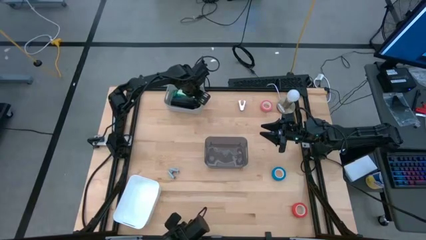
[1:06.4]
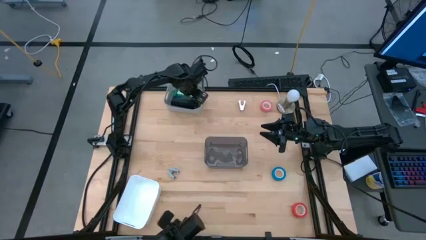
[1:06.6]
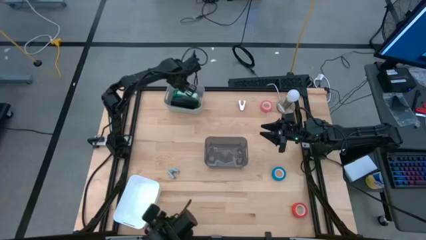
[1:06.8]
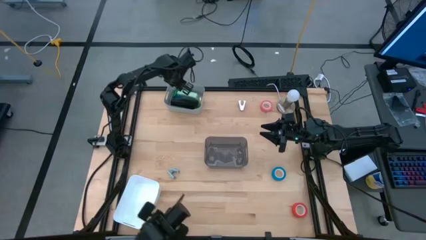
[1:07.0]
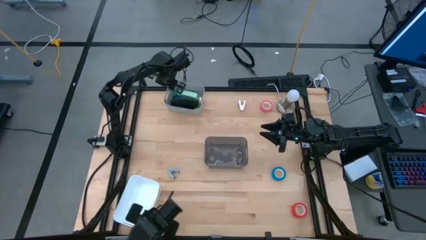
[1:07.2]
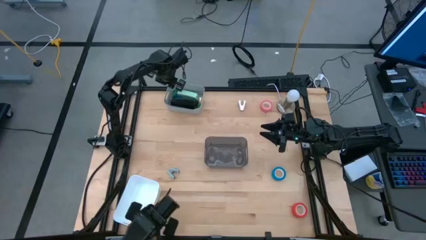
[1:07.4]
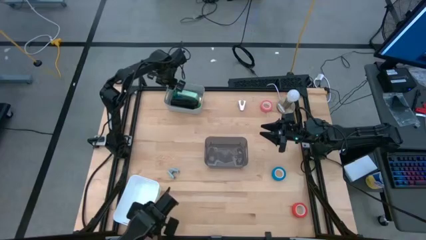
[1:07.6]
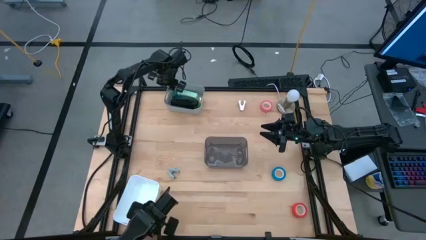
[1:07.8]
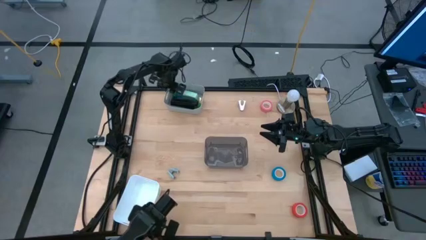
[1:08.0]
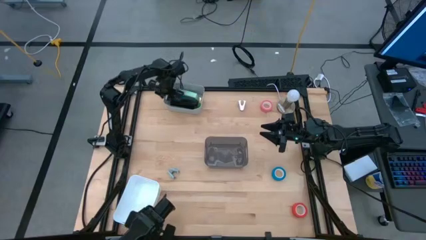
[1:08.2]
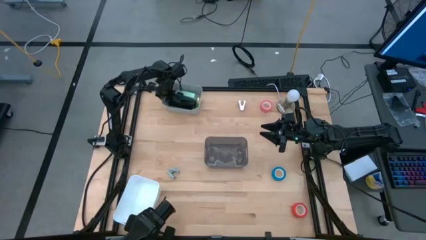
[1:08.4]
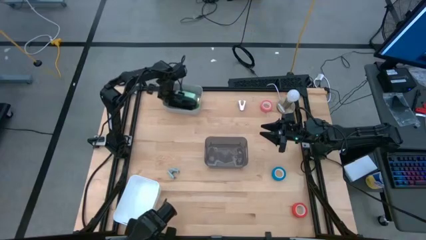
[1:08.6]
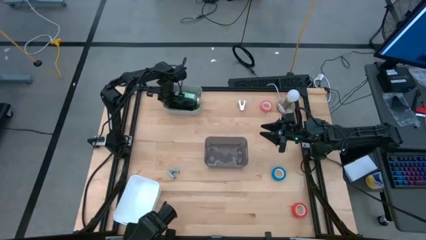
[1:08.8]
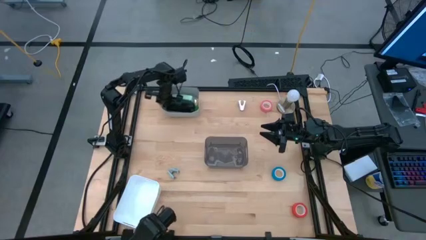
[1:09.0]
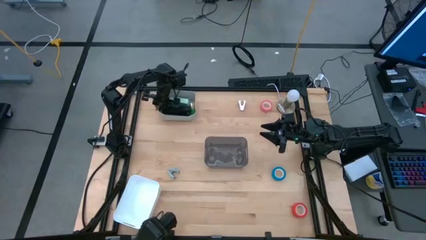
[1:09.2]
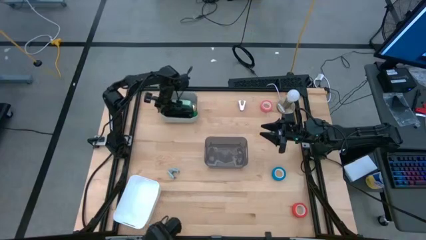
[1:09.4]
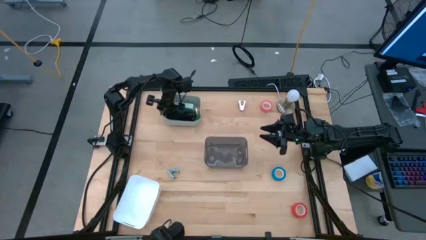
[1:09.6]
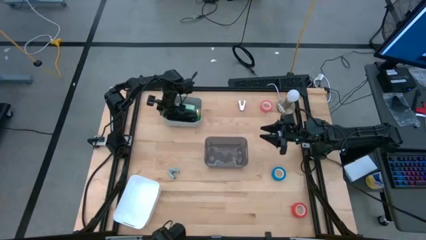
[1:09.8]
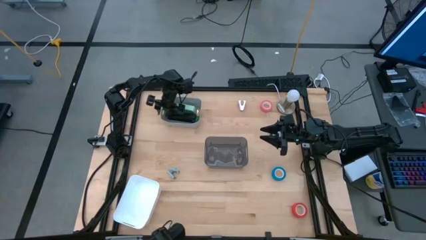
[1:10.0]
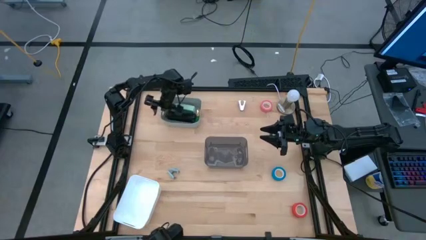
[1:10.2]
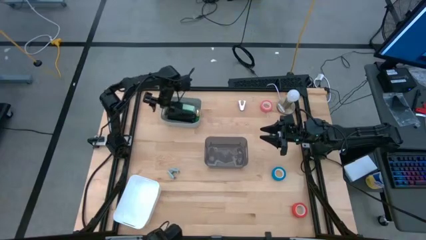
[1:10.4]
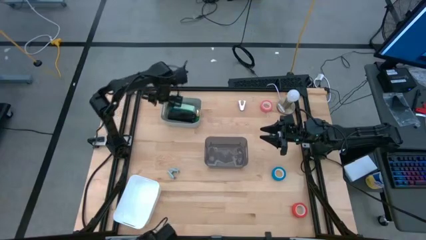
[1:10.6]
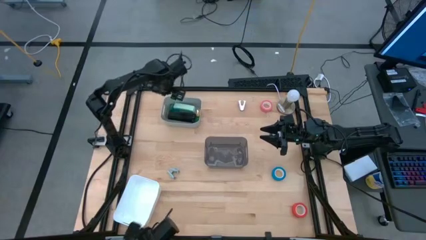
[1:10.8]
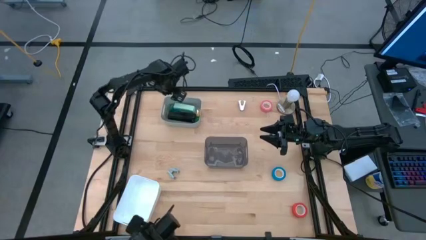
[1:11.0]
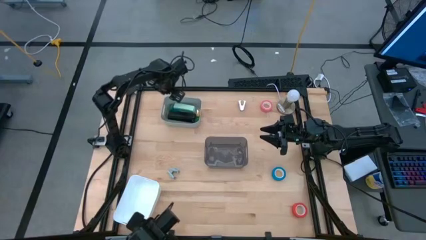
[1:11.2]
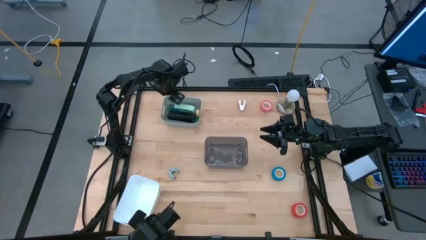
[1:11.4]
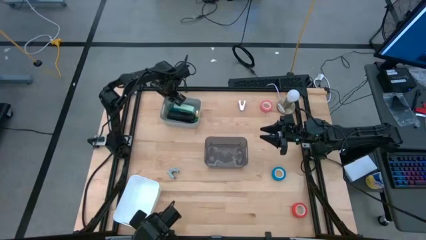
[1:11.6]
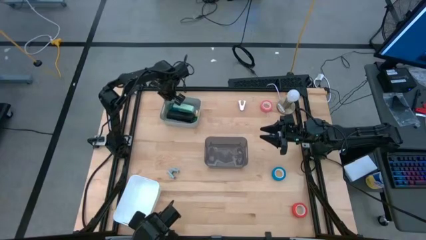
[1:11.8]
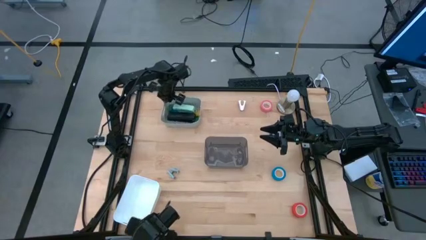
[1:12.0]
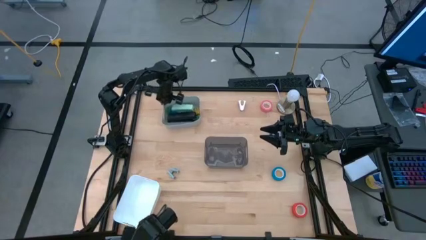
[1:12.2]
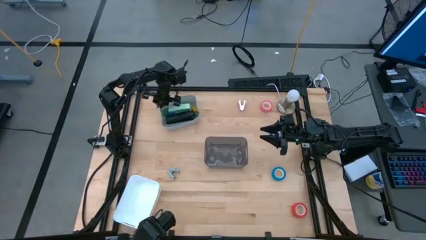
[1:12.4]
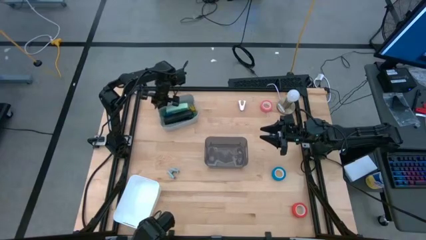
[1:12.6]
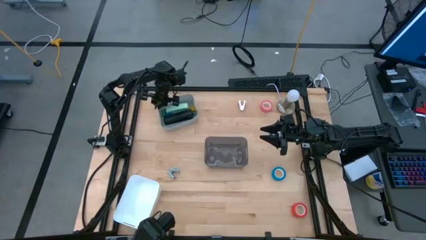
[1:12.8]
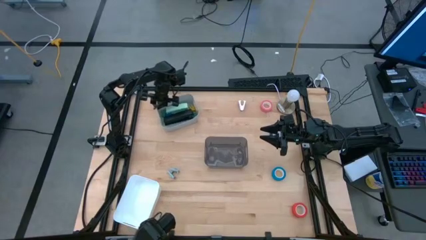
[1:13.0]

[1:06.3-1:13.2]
Task: Pick and place Stapler, Stapler remover, tape
Adjust the gray bin

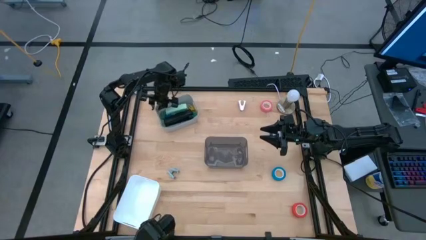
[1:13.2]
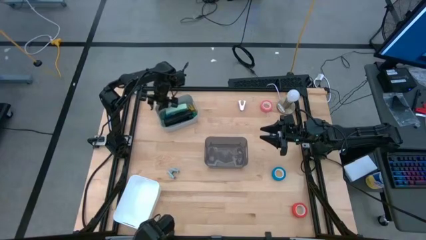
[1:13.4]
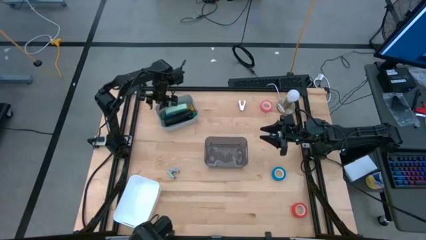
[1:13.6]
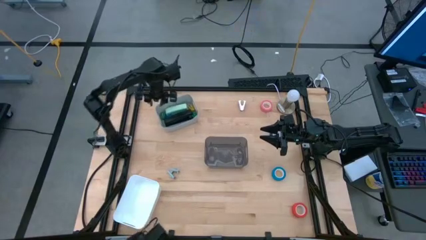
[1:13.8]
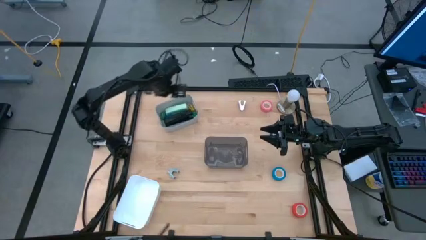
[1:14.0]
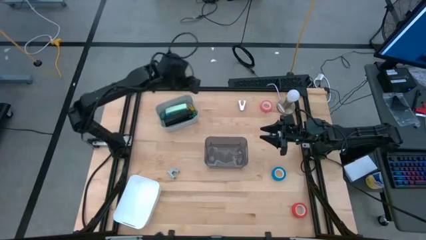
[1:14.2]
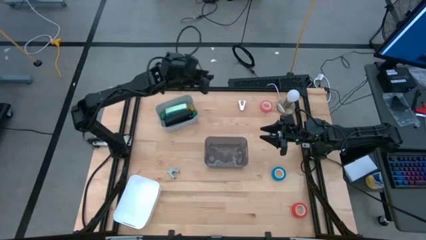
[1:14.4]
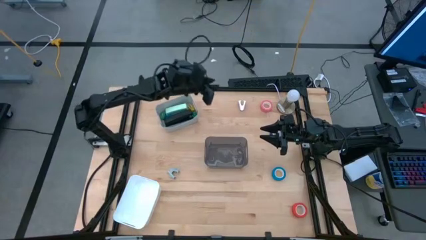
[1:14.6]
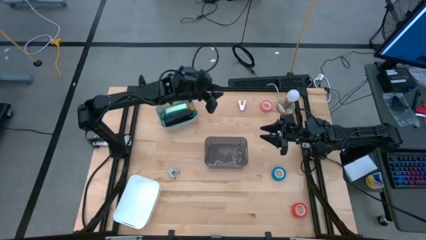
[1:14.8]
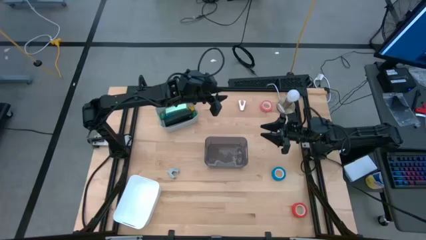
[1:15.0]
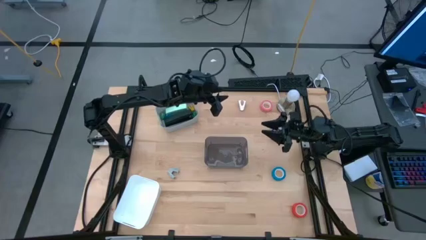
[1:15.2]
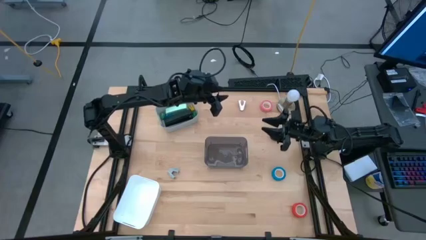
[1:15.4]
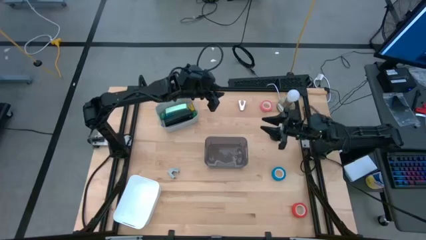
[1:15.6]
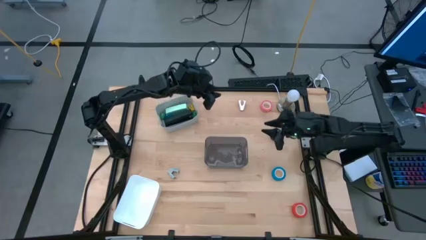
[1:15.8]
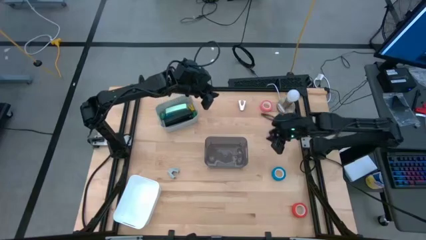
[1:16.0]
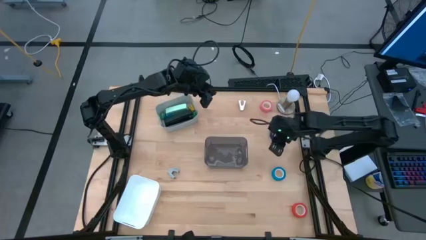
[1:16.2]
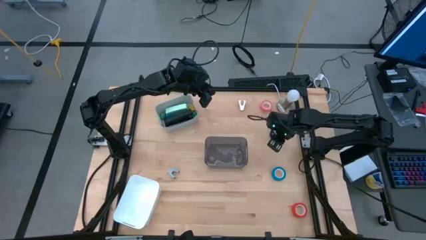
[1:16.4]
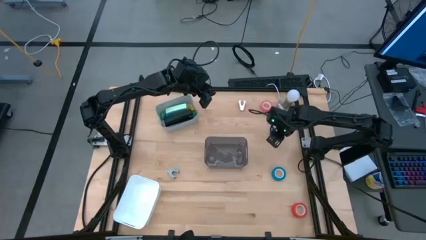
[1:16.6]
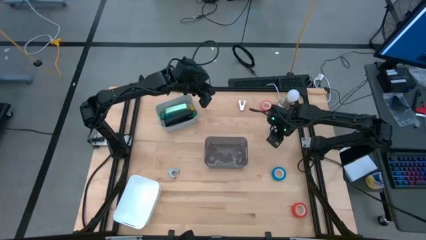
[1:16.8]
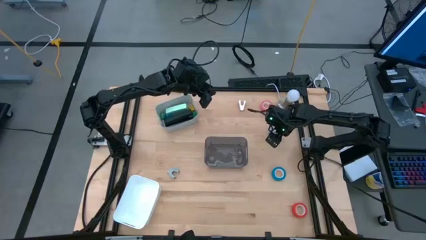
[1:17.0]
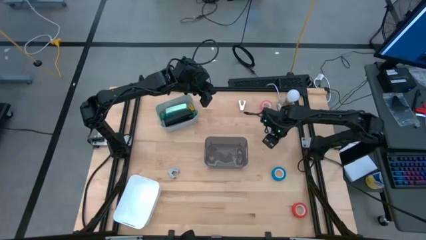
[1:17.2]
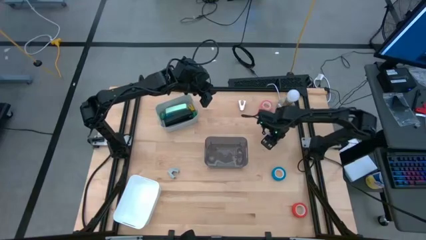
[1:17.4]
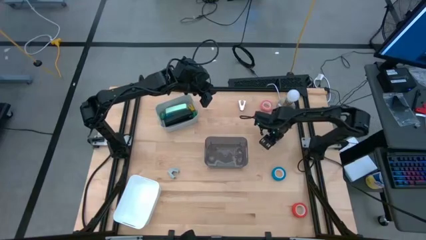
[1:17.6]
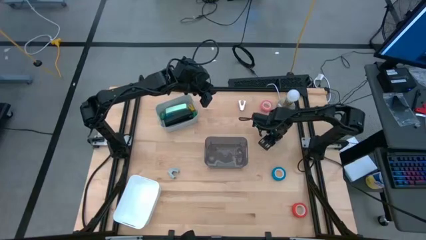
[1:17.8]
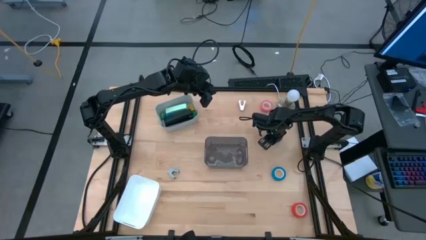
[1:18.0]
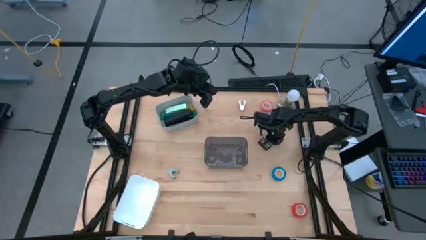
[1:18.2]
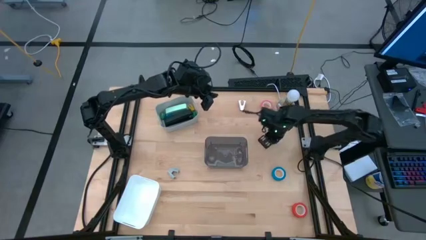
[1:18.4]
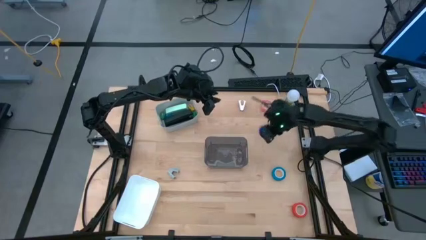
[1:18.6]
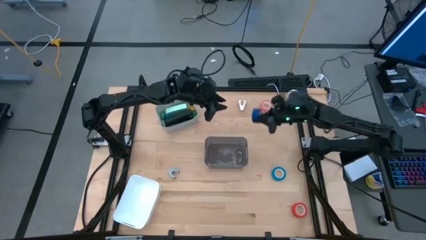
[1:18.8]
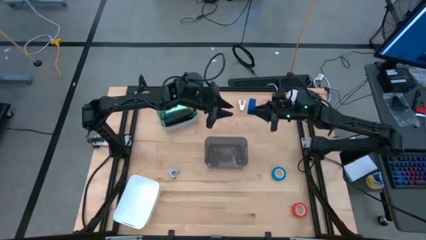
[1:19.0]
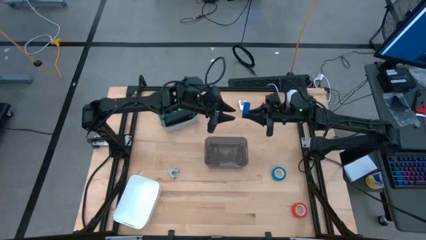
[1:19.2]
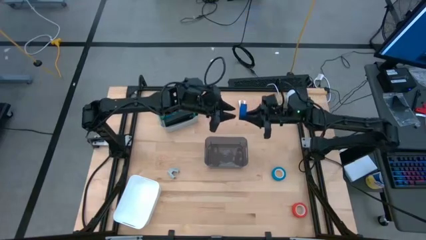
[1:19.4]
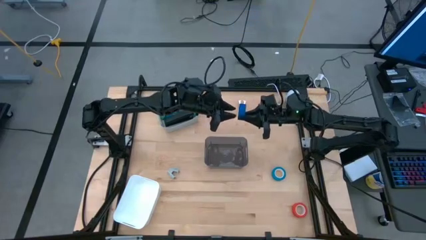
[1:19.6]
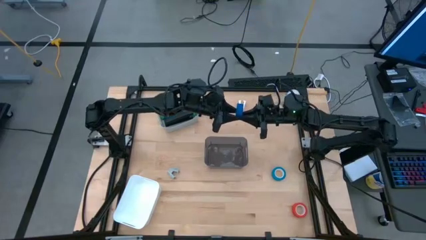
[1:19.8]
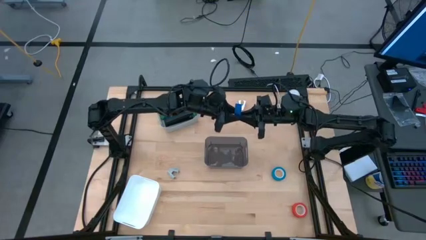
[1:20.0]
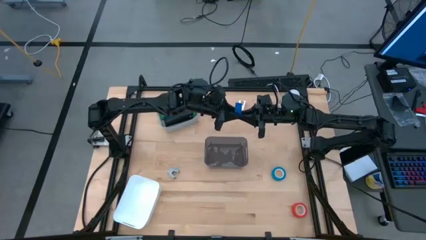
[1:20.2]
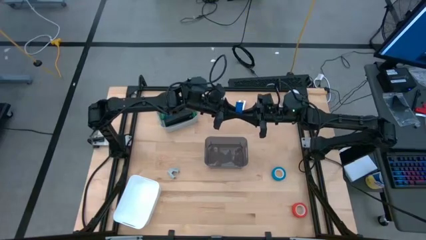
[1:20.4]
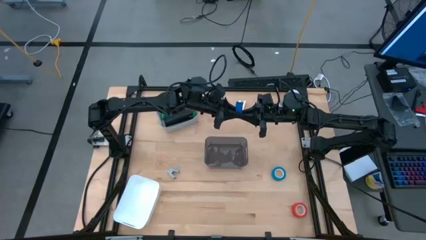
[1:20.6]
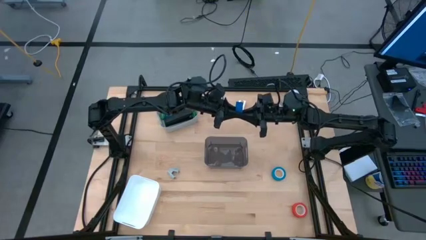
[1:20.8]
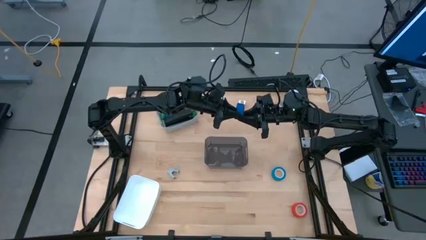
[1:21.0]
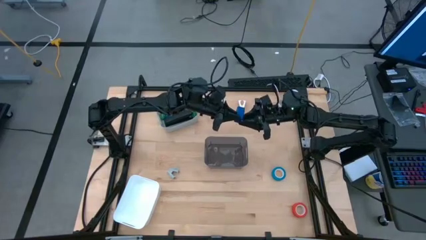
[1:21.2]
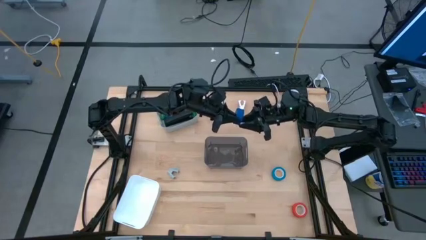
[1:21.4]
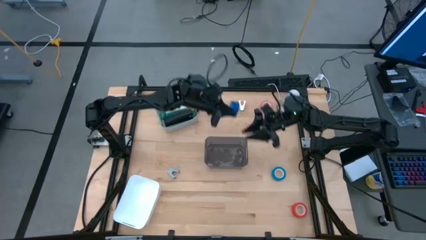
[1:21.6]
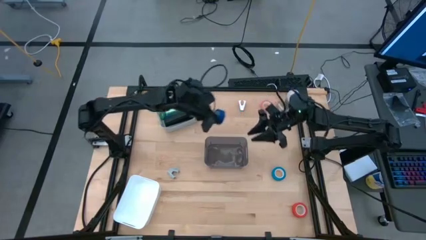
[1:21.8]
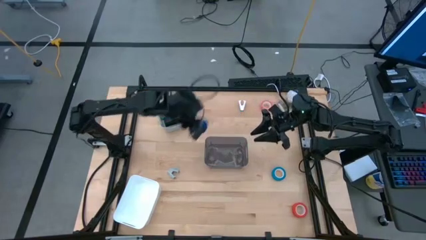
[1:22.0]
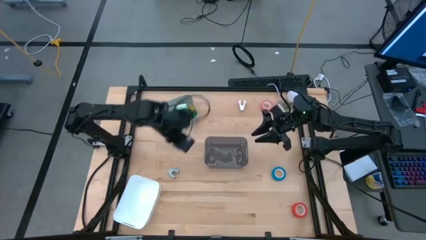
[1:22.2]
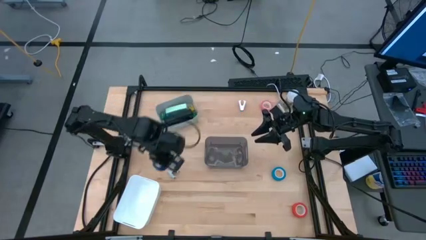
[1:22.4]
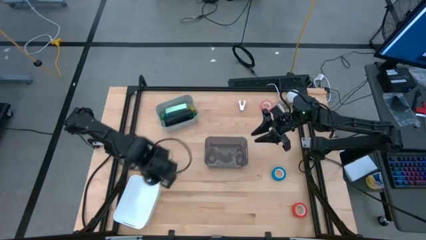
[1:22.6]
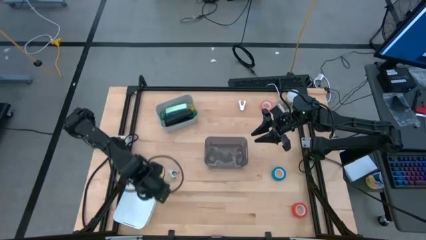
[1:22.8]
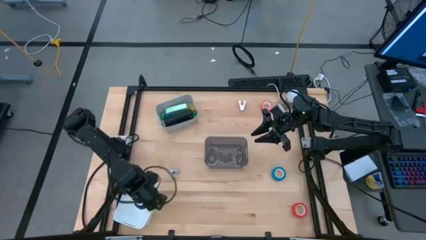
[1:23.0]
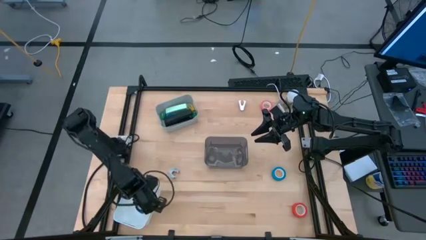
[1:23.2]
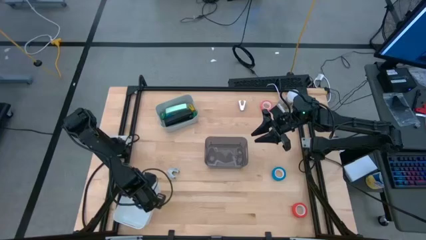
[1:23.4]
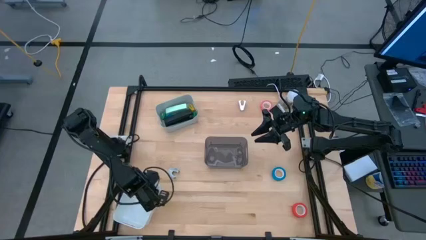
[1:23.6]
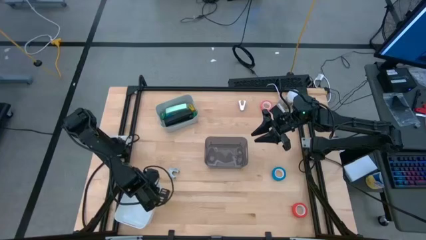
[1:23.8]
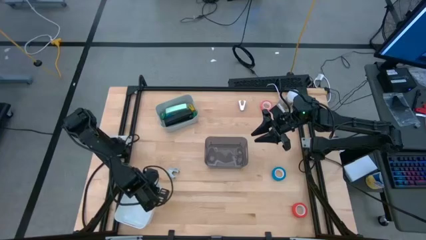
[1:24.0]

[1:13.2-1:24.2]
Put the blue tape into the white bin
